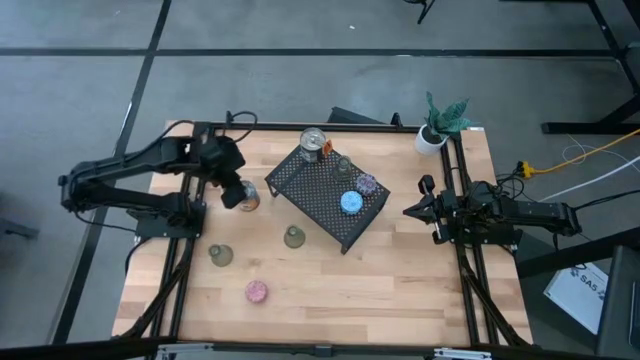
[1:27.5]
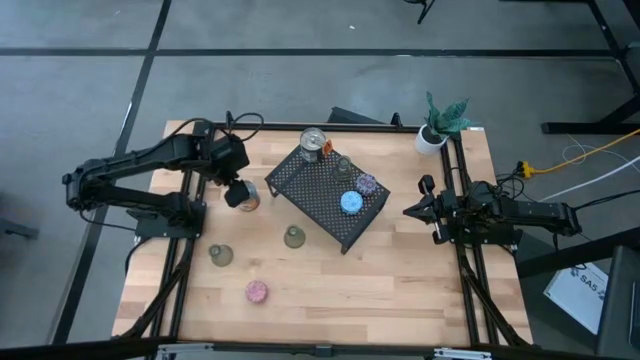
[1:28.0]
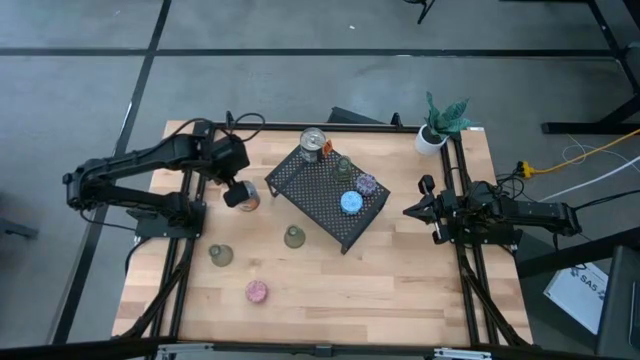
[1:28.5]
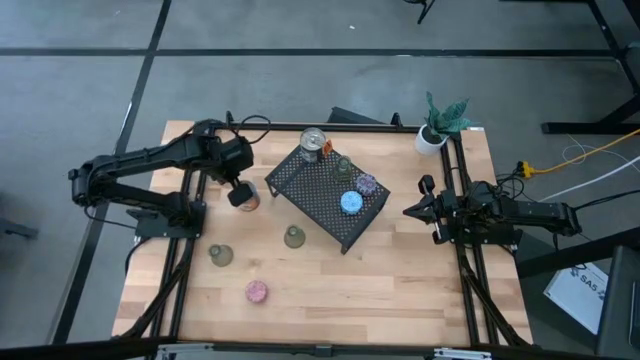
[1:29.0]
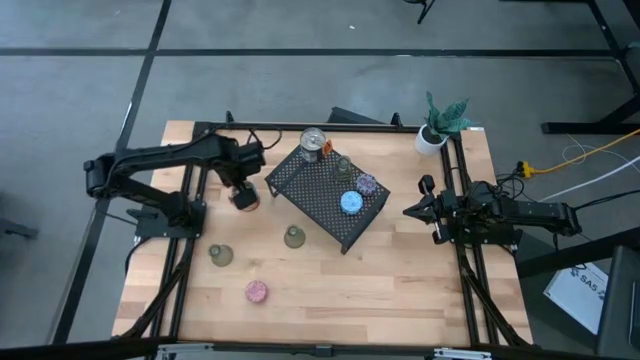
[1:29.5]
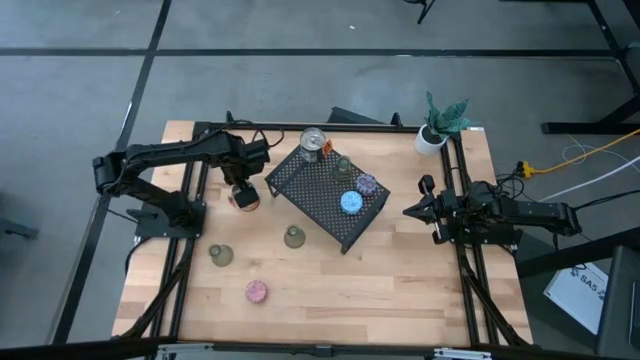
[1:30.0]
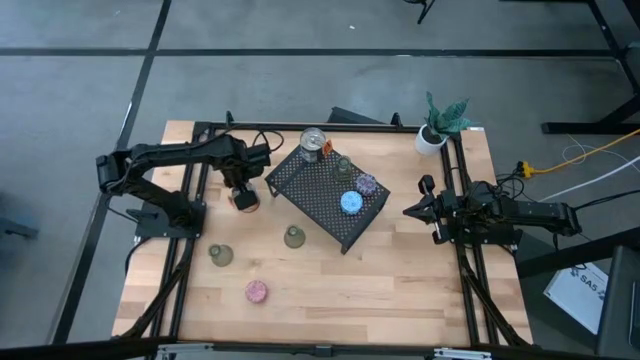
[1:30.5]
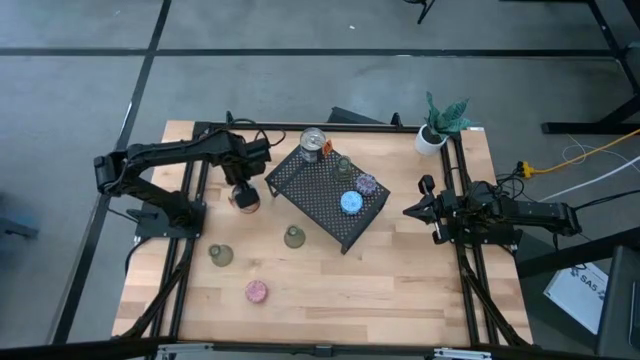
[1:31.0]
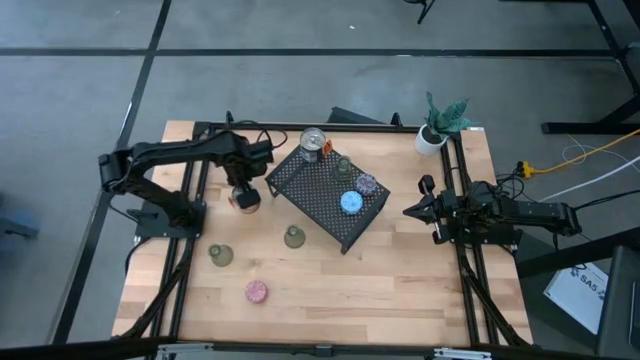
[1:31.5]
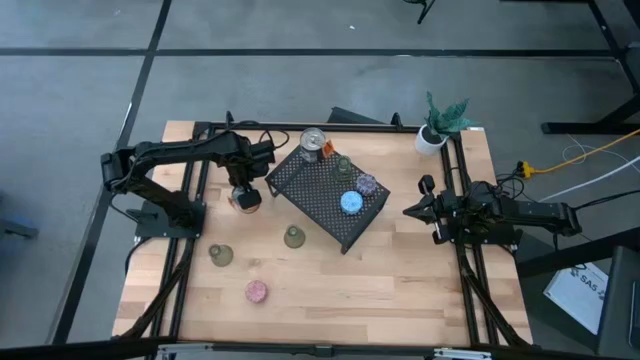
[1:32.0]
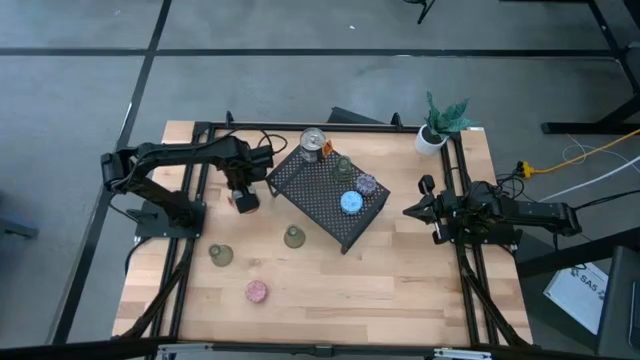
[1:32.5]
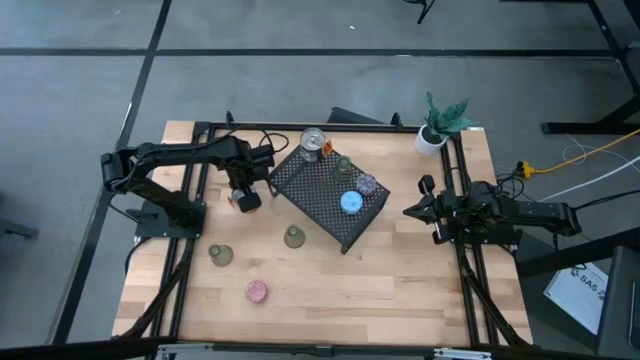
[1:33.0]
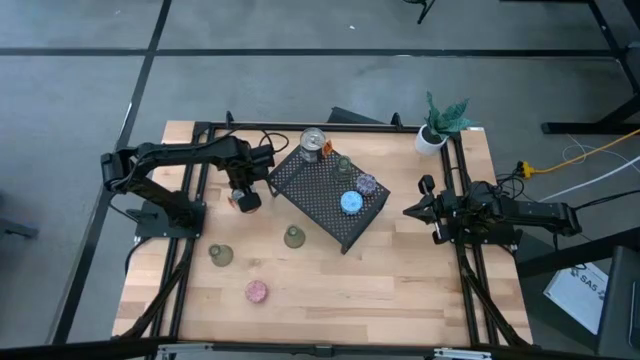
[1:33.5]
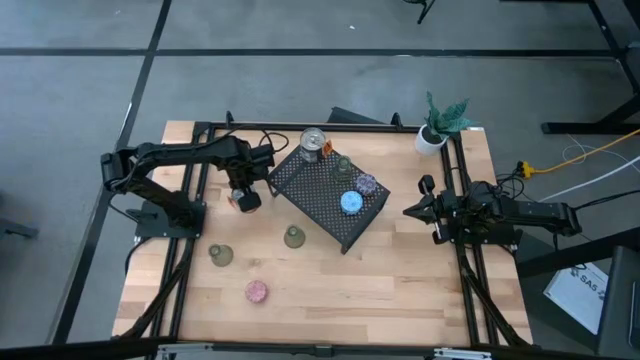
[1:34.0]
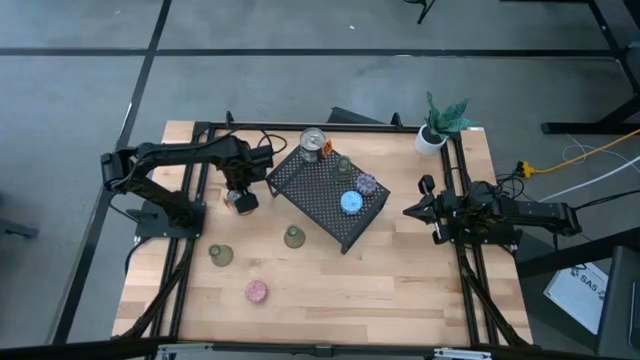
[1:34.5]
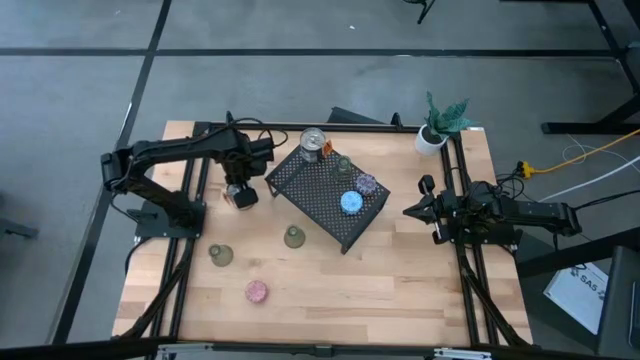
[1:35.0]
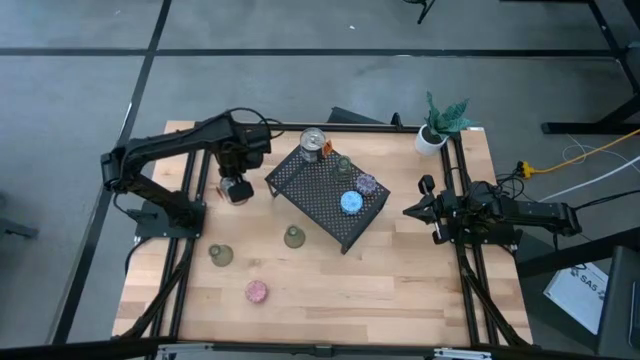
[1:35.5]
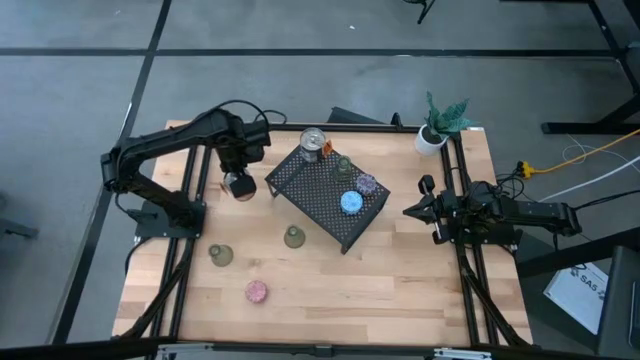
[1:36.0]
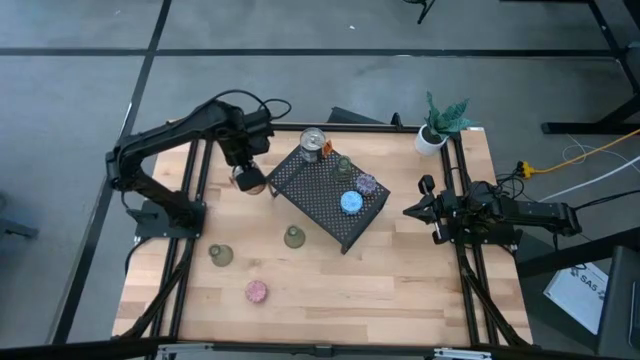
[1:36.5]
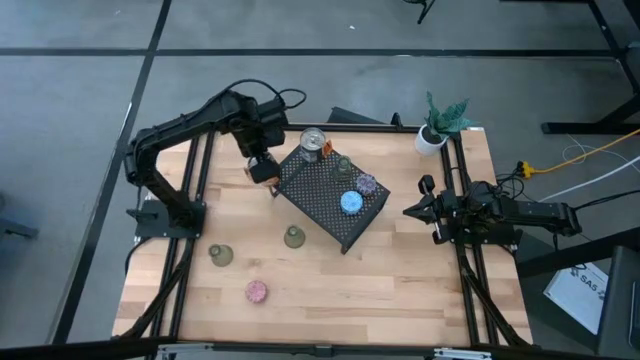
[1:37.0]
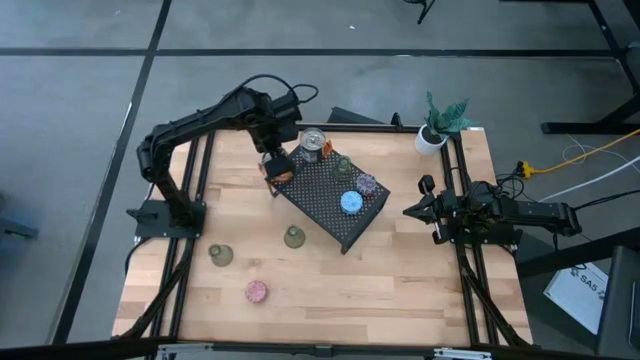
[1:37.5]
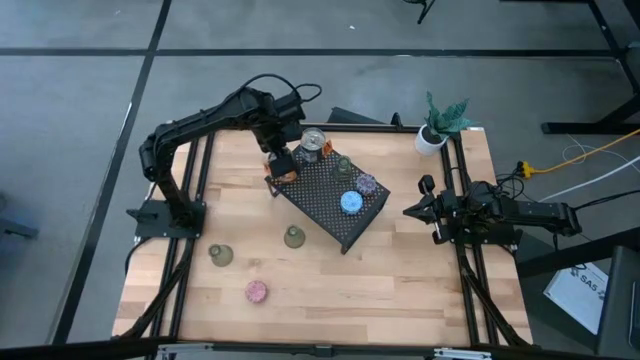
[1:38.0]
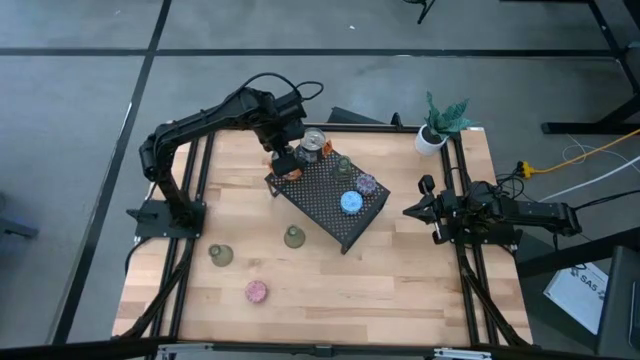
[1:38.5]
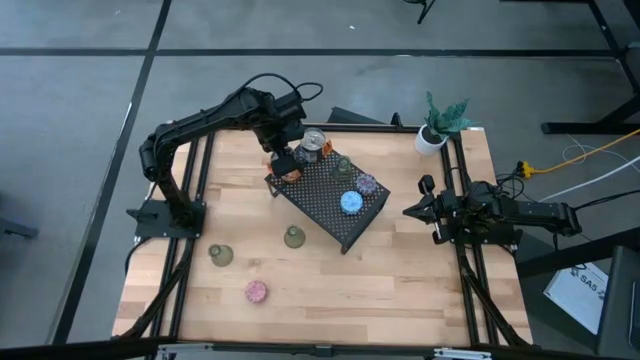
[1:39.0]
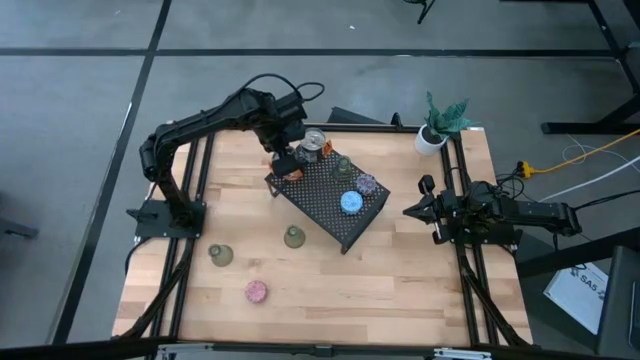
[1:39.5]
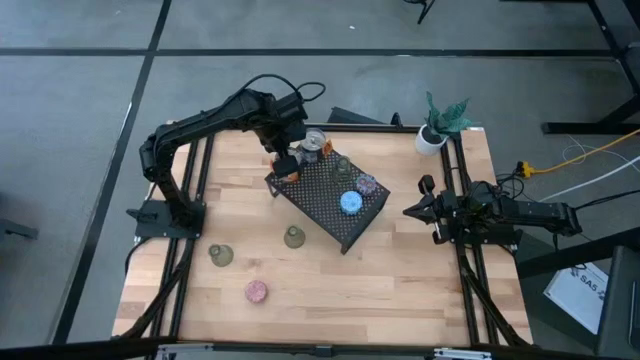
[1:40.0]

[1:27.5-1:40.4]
Task: Pick & Place candle stick holders
Put the brown scented candle on the shelf
